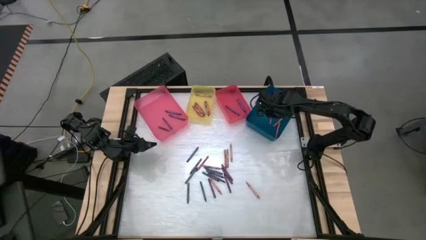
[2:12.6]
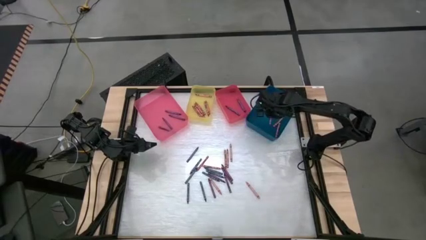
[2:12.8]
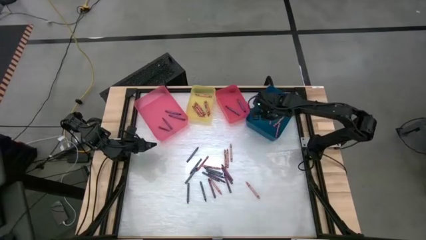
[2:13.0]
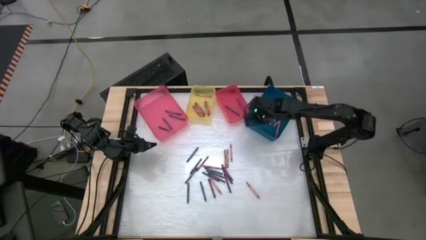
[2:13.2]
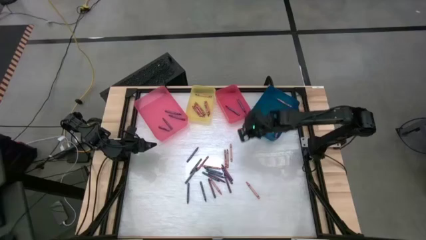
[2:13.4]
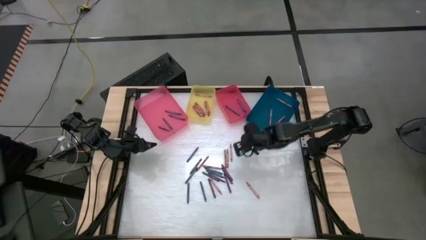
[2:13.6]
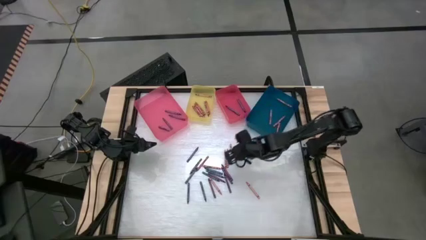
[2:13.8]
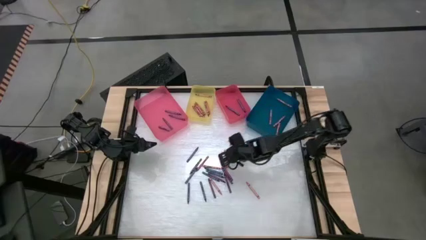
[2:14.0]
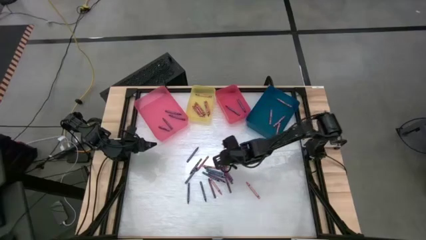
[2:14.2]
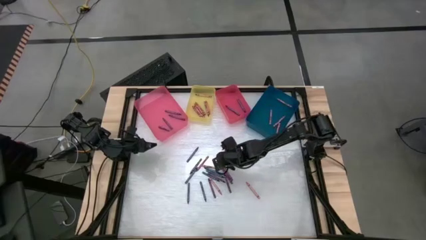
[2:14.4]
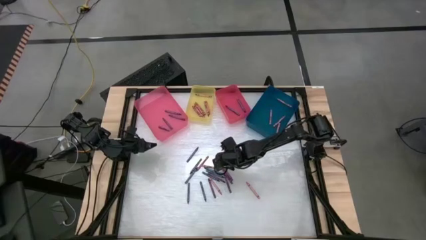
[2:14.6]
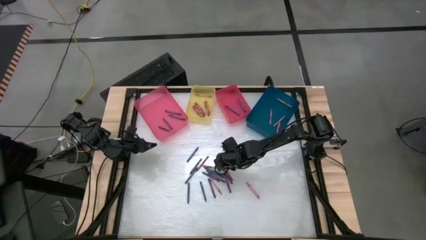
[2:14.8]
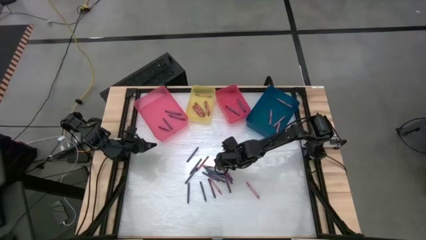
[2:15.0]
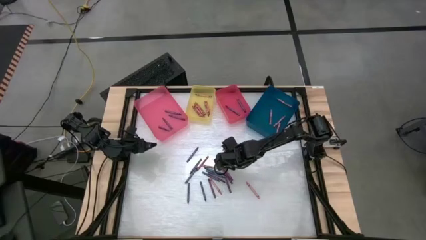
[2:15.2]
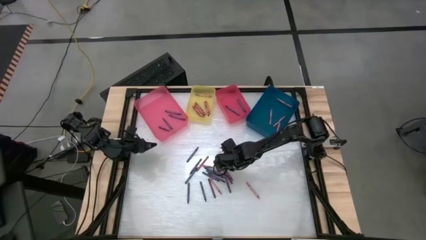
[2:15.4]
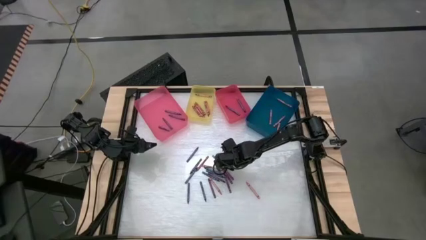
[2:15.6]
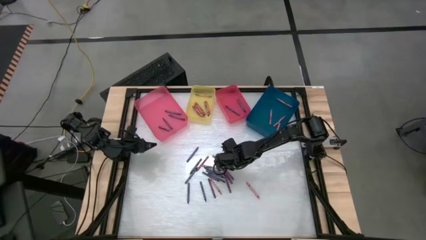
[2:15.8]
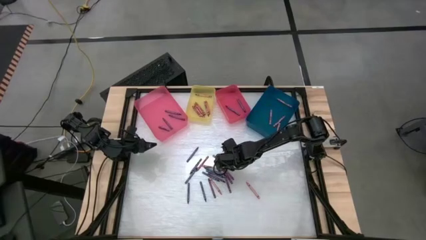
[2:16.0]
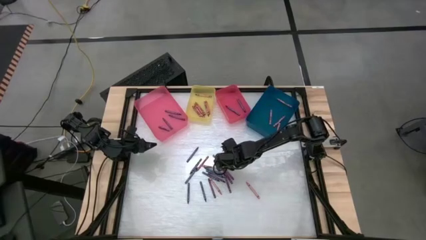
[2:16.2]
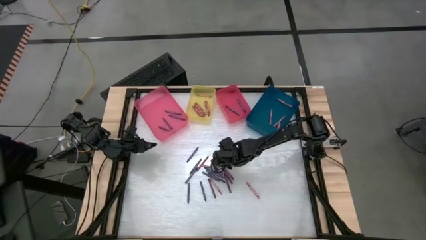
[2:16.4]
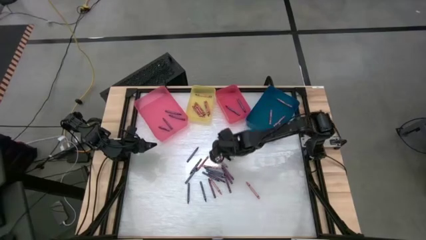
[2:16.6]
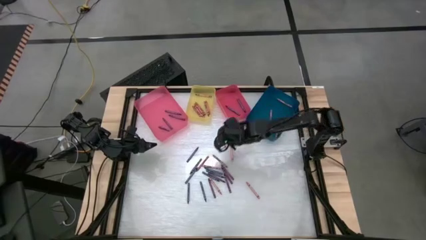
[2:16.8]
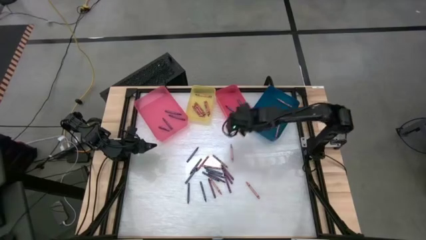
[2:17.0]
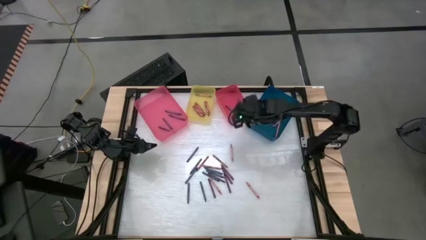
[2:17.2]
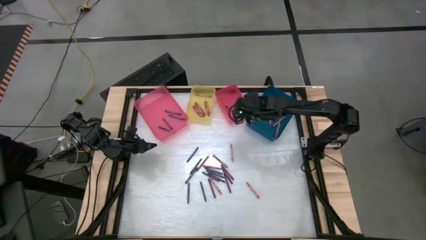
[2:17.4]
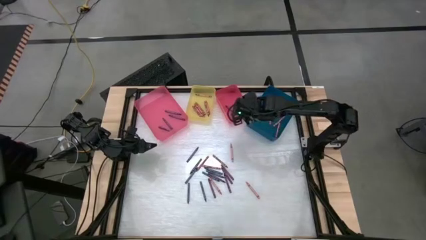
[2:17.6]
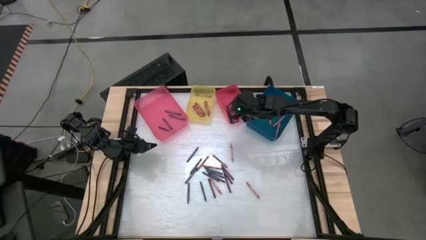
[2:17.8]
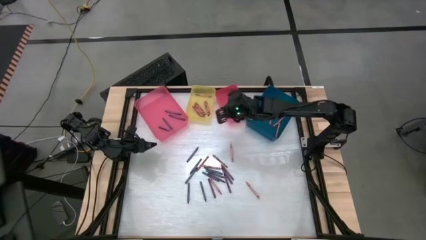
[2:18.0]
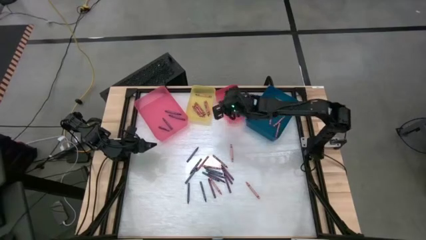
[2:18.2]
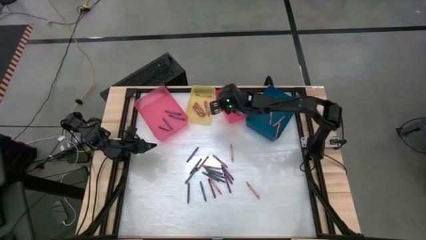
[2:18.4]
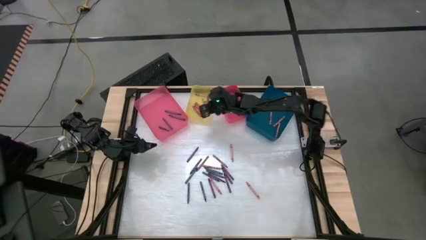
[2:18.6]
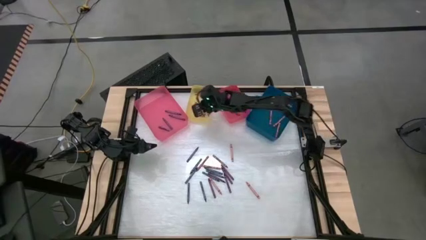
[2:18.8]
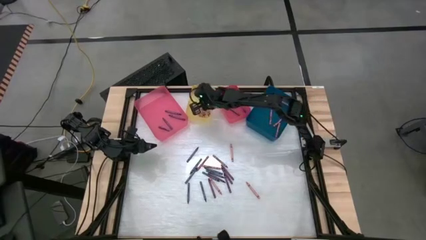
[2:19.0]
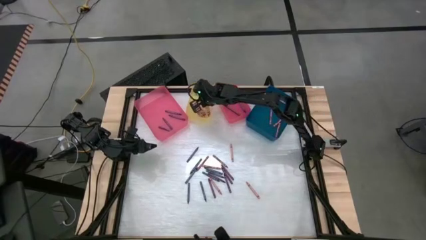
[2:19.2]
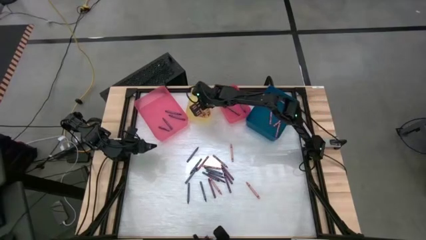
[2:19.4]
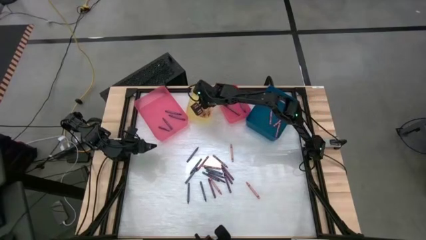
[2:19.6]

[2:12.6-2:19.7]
Task: Sort crayons
Put the red crayon into the yellow bin

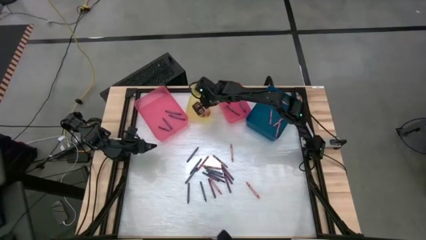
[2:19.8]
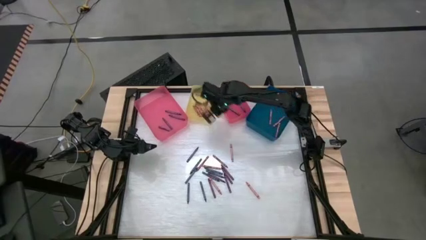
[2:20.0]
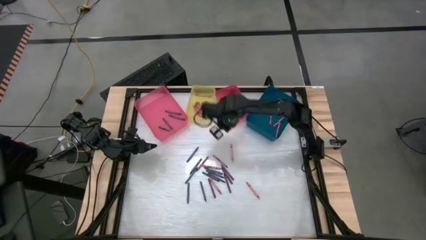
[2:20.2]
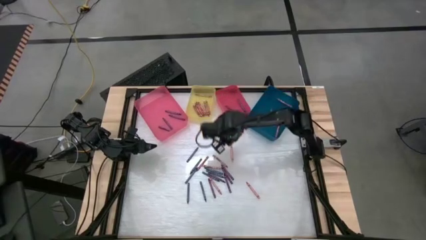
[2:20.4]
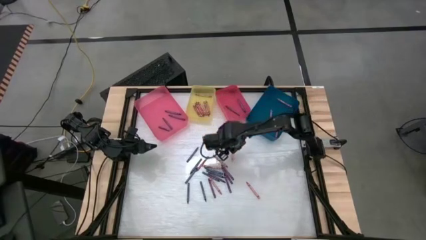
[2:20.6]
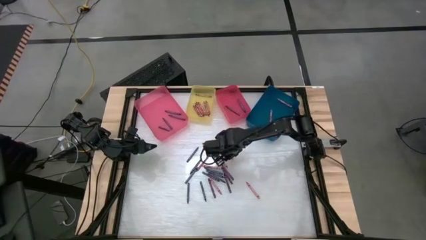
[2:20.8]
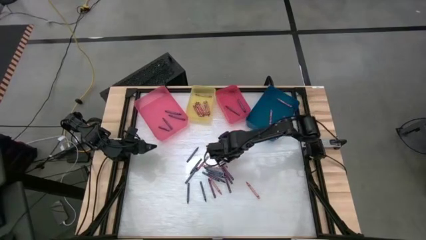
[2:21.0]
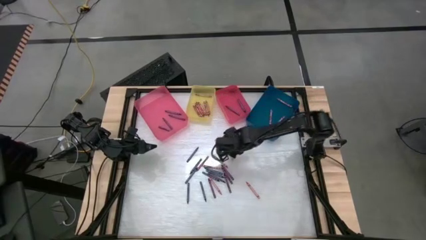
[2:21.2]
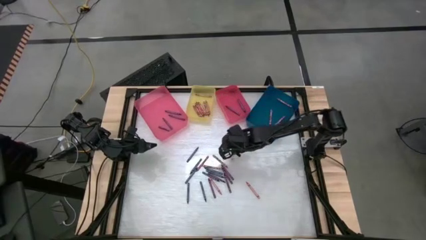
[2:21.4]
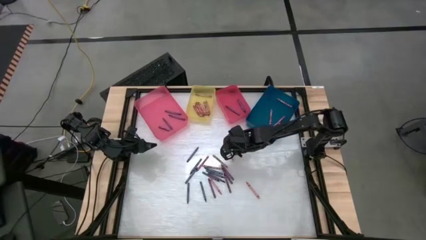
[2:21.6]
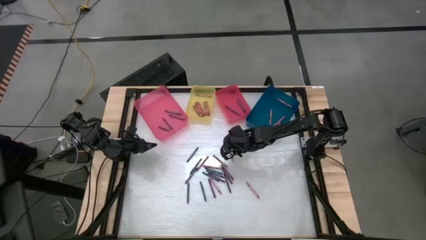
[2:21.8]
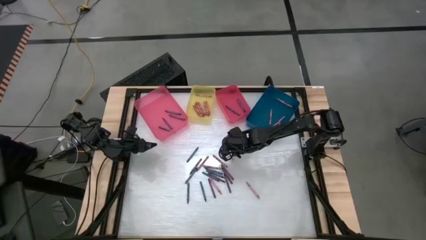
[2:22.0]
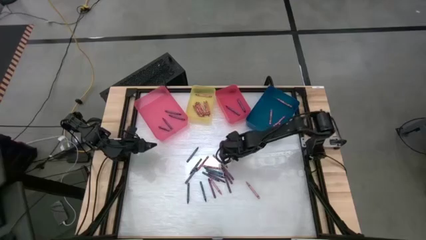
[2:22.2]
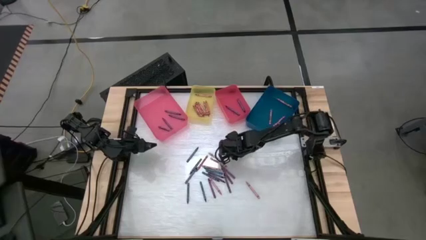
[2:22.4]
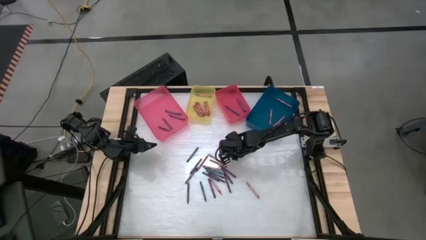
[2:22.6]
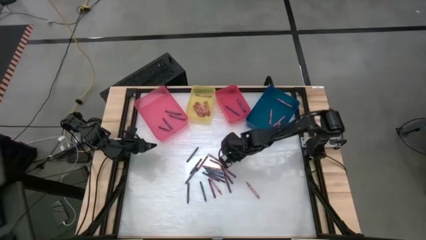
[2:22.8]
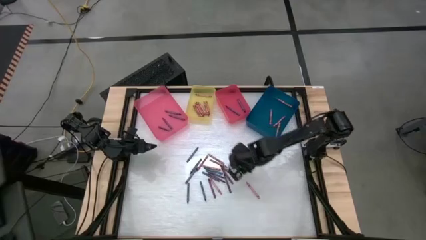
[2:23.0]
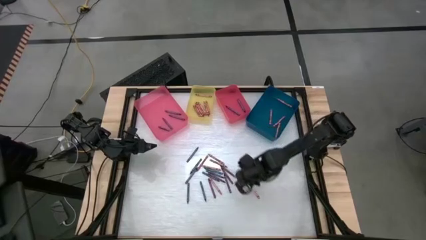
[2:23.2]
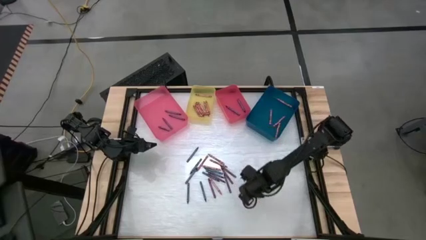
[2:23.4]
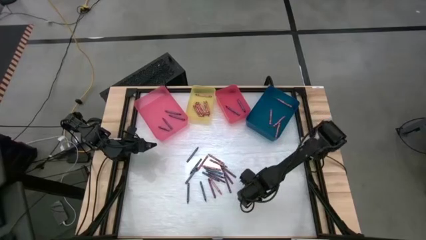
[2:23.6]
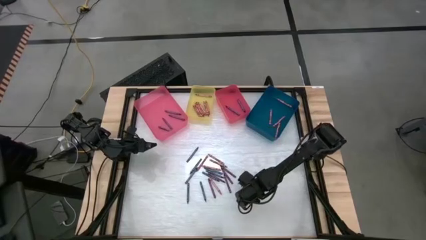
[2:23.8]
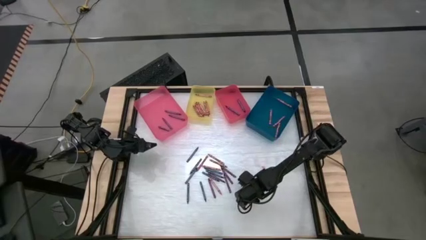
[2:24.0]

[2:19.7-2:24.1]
Put the pink crayon into the blue bin
